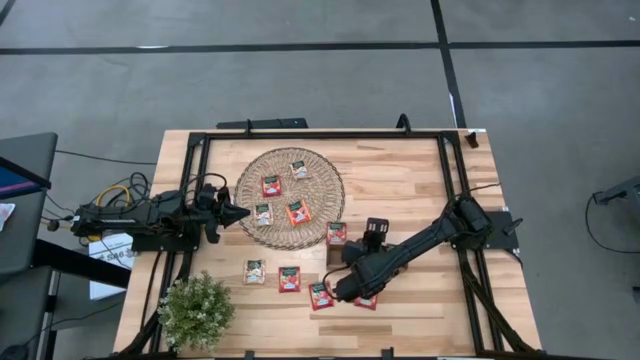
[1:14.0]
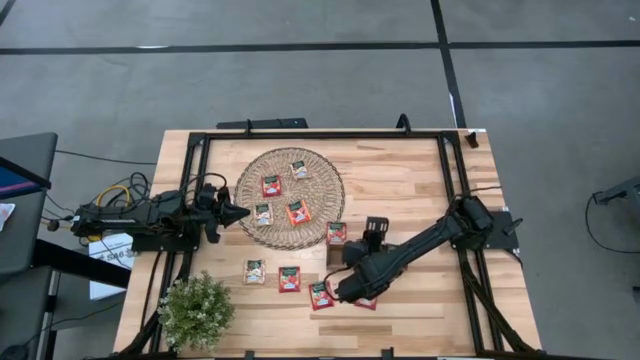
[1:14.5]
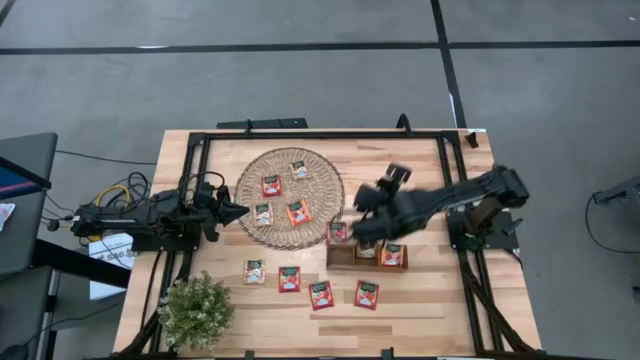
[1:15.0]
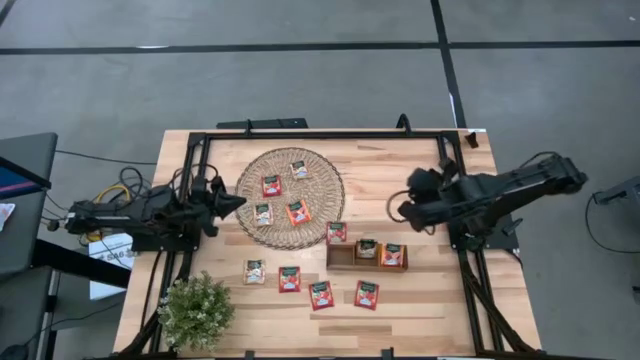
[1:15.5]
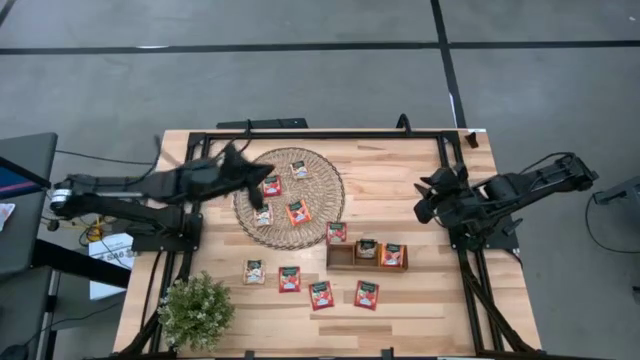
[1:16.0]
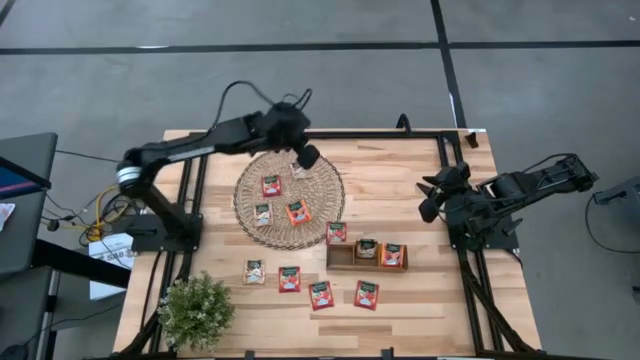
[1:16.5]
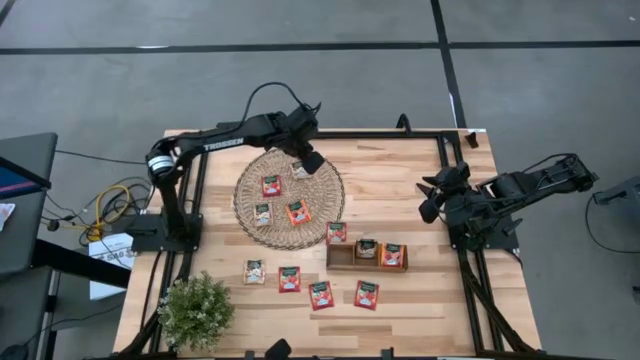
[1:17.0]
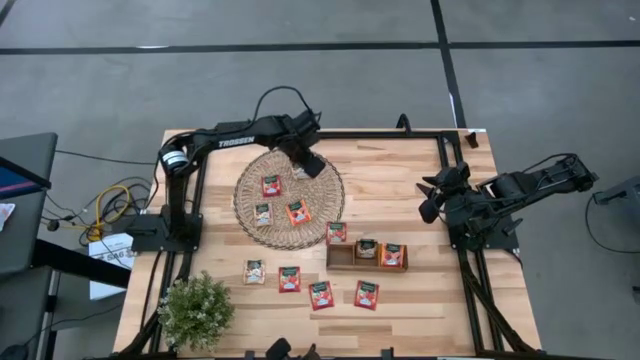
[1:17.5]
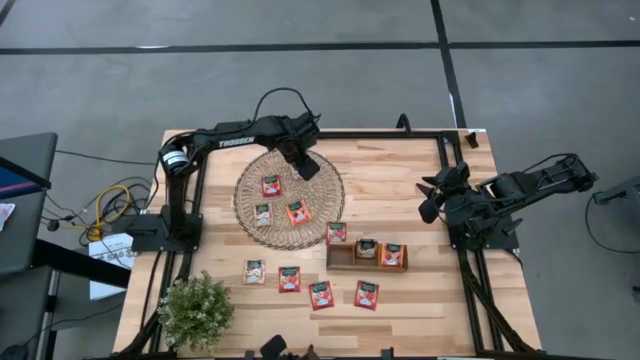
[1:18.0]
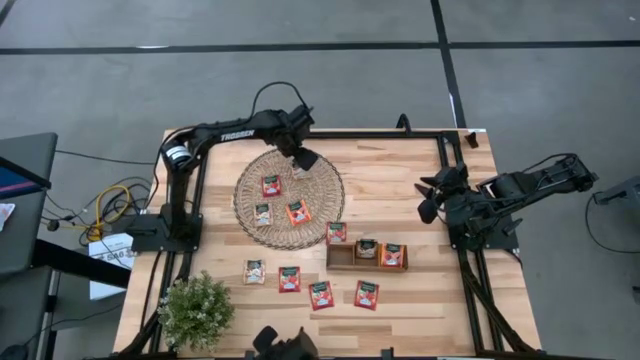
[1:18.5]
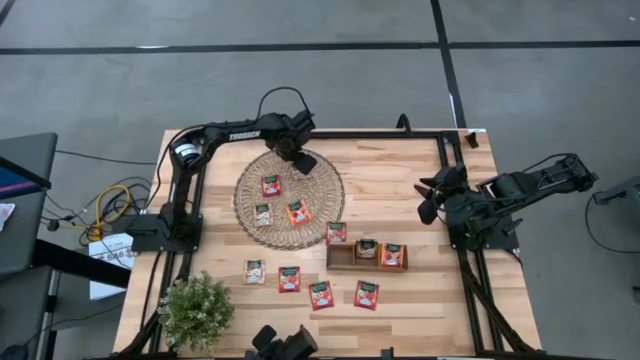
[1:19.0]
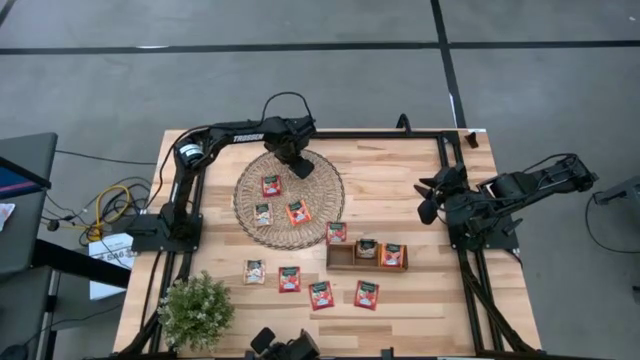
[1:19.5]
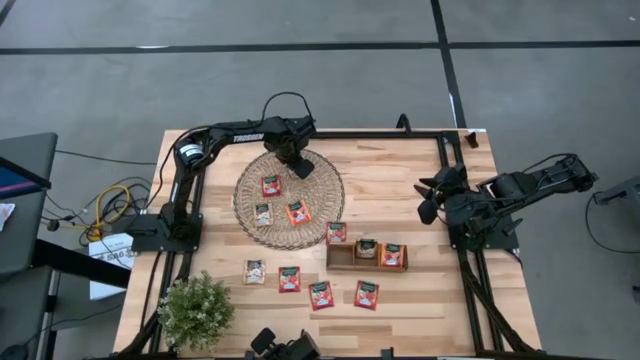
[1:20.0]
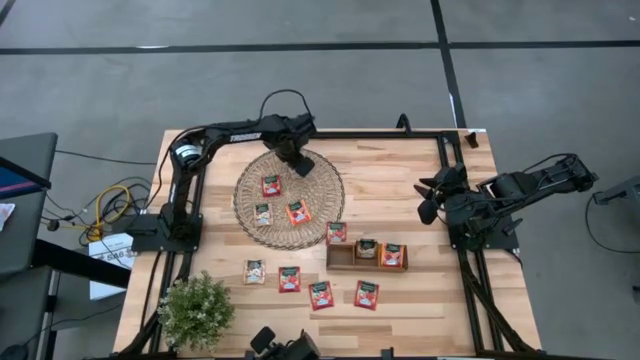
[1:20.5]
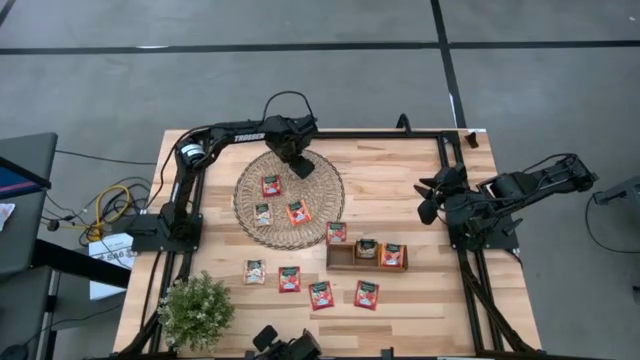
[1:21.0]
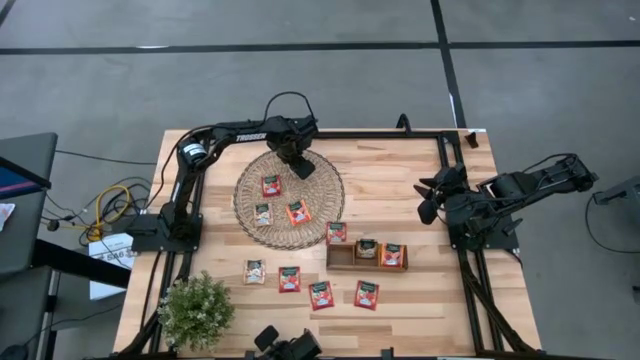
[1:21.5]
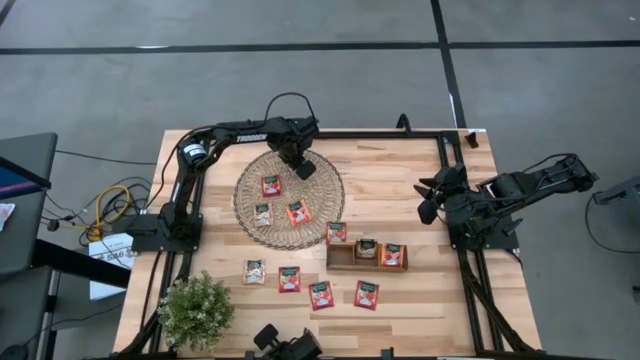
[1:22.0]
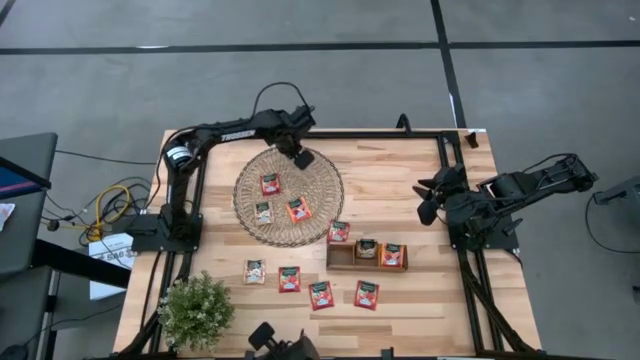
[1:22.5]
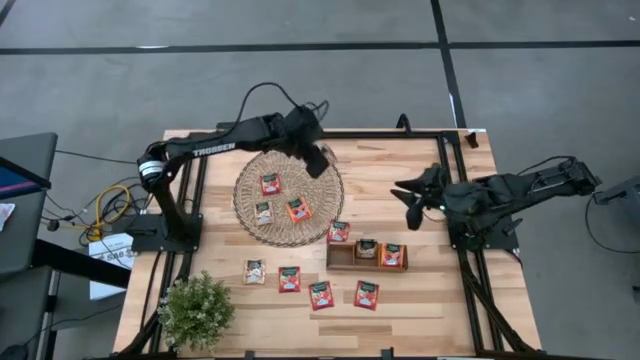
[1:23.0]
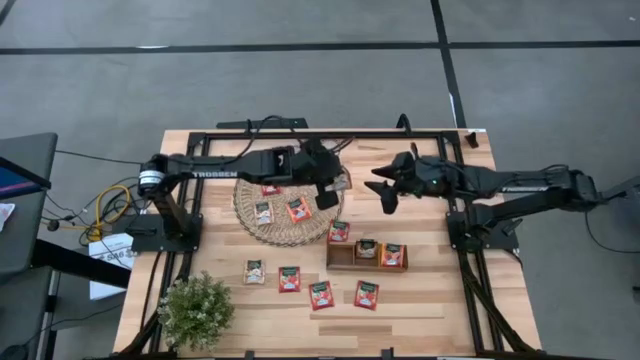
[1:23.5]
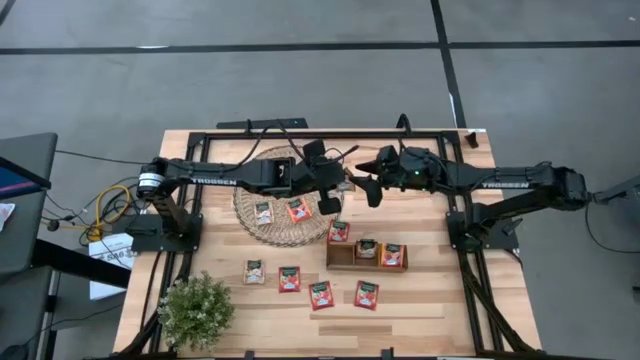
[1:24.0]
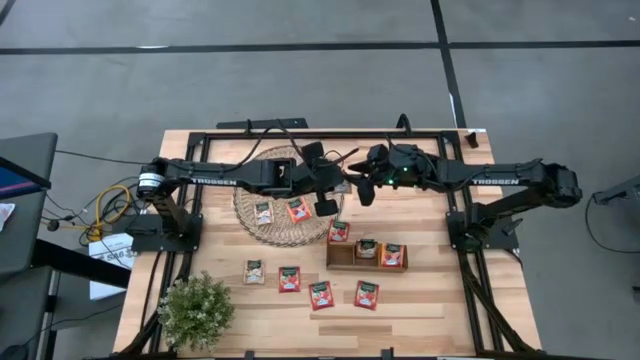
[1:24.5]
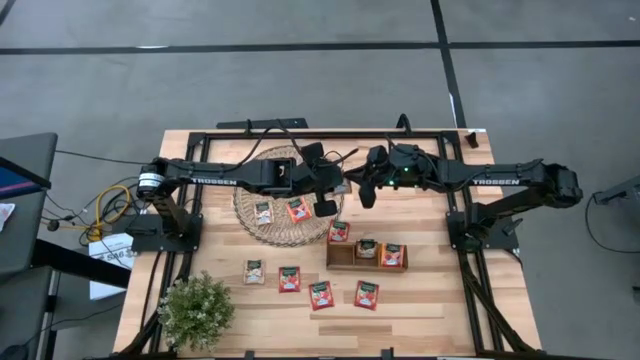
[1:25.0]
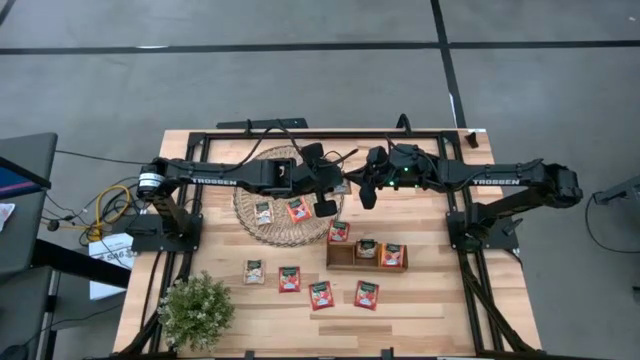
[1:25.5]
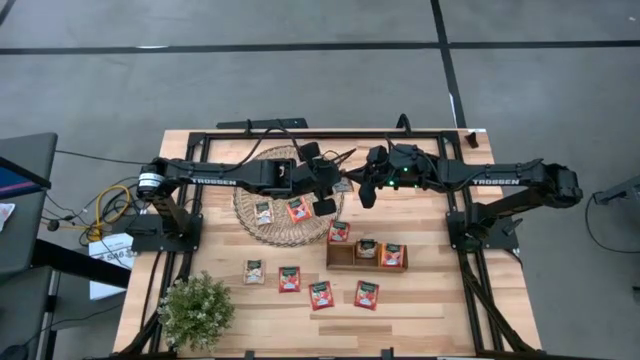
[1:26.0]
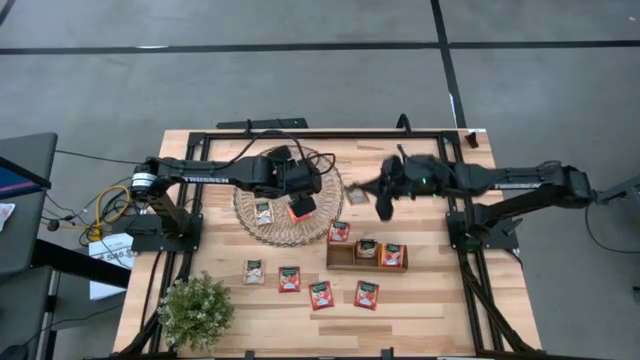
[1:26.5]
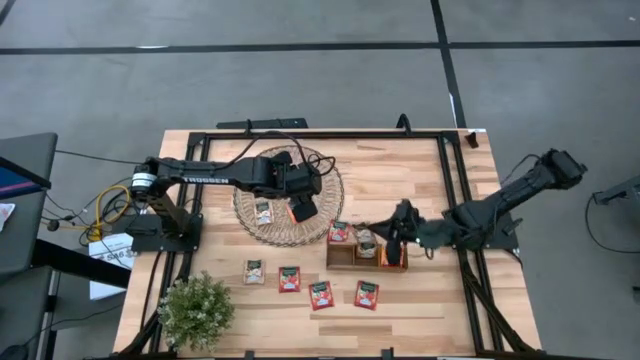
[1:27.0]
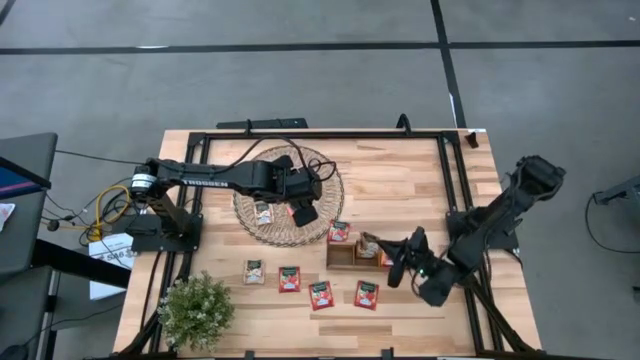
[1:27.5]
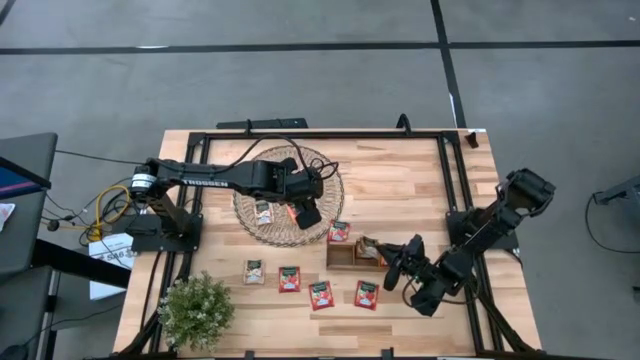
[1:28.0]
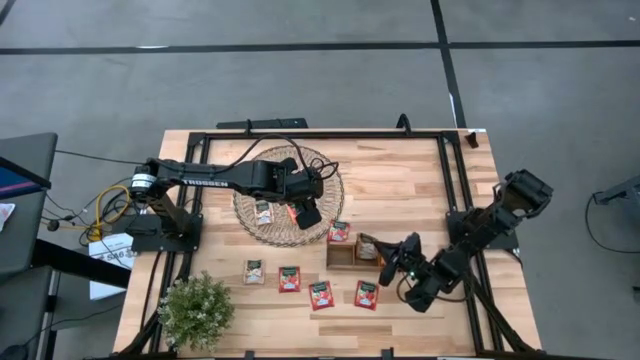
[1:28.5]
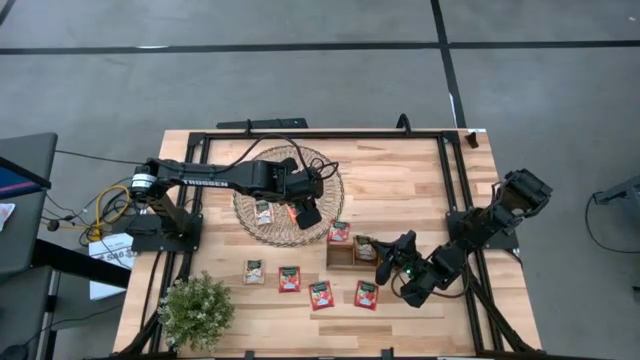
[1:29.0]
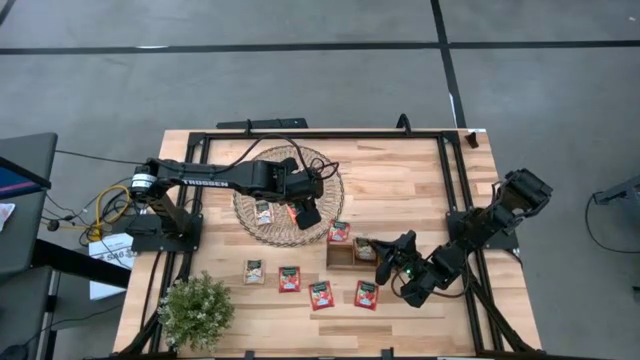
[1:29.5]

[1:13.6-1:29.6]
Task: Pick & Place Tea
Put the brown tea bag into the middle section of the wooden organizer
